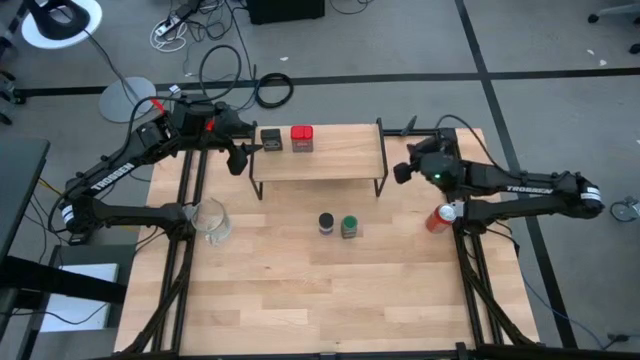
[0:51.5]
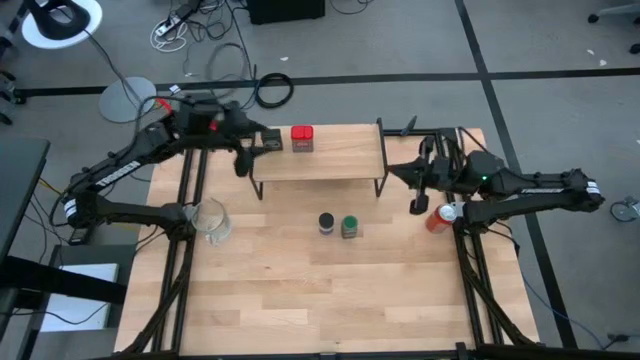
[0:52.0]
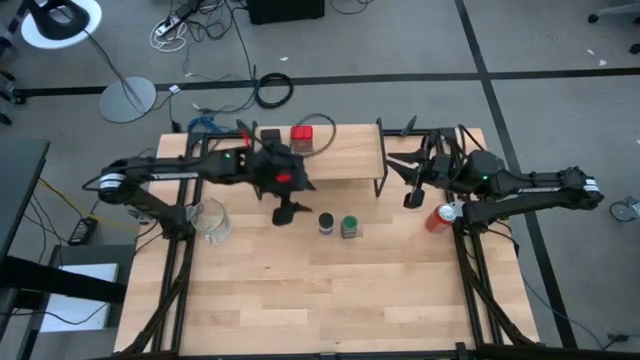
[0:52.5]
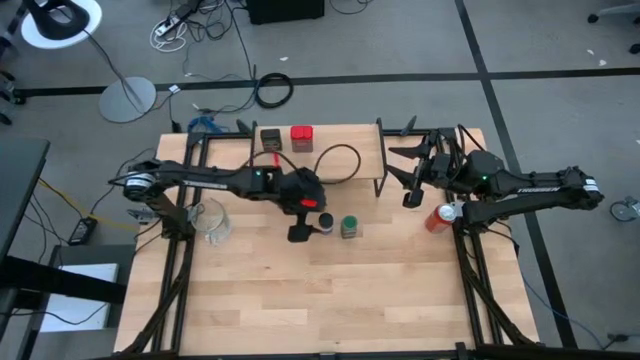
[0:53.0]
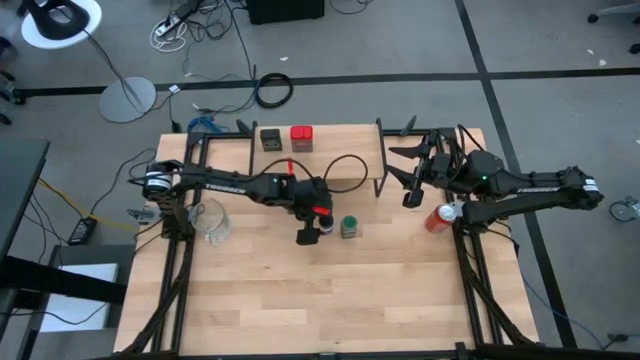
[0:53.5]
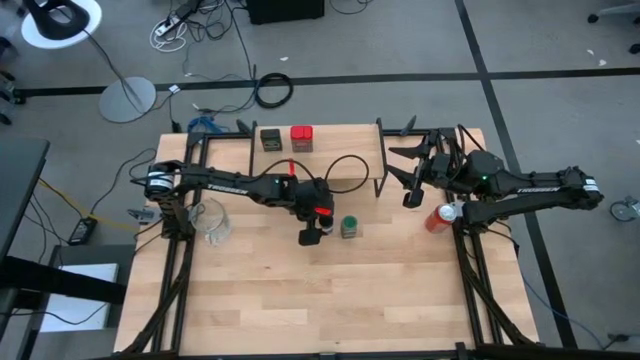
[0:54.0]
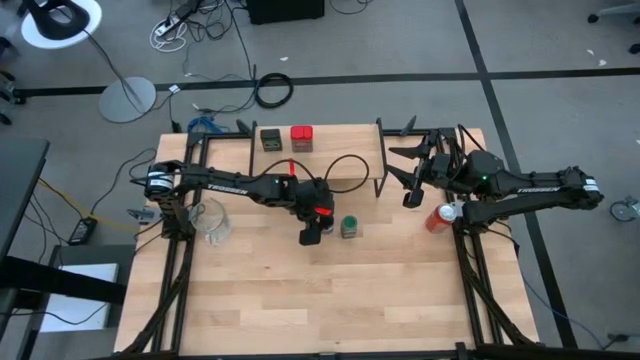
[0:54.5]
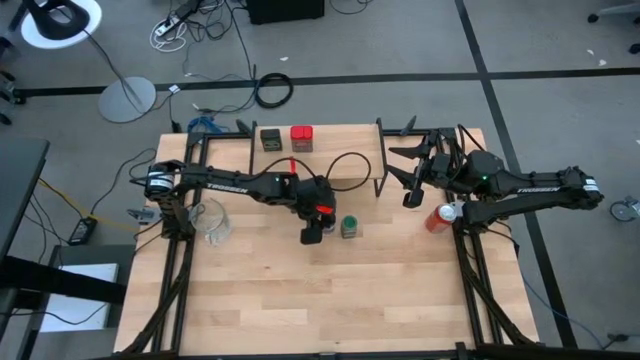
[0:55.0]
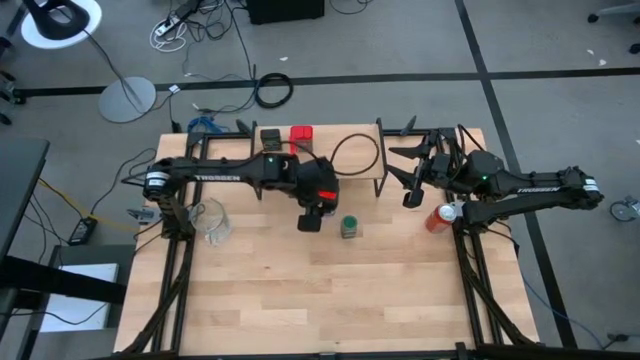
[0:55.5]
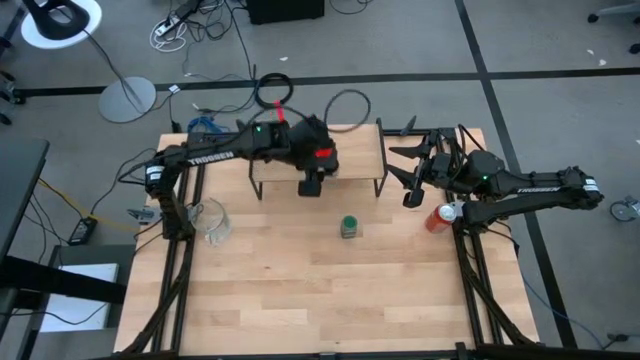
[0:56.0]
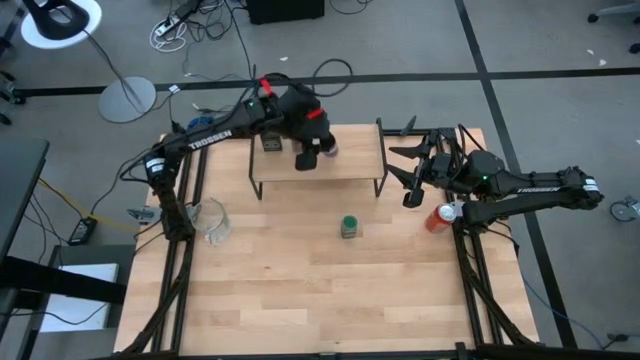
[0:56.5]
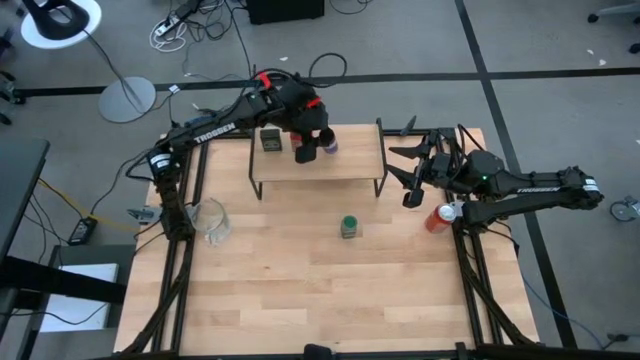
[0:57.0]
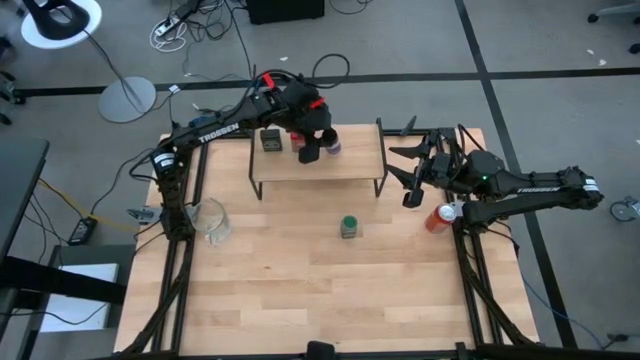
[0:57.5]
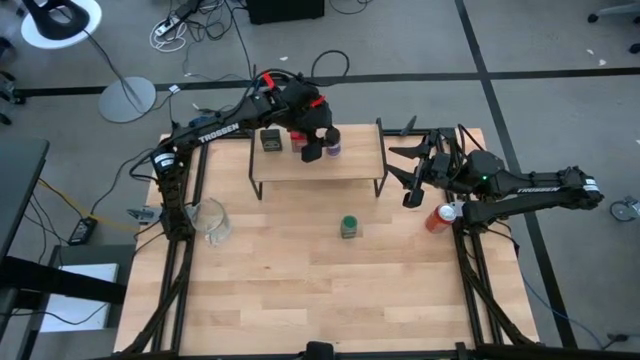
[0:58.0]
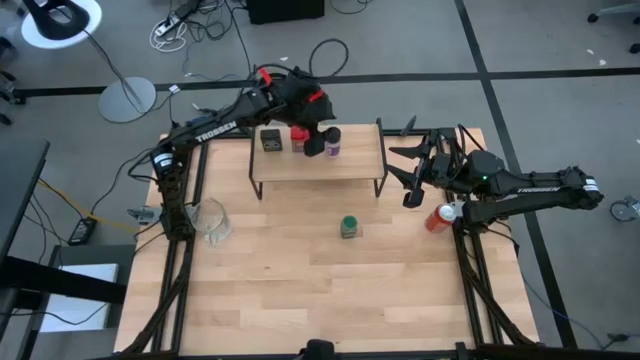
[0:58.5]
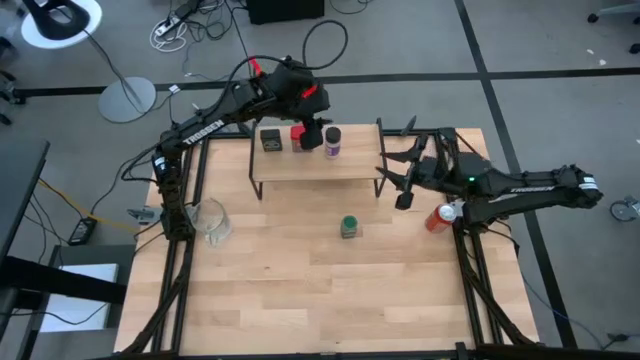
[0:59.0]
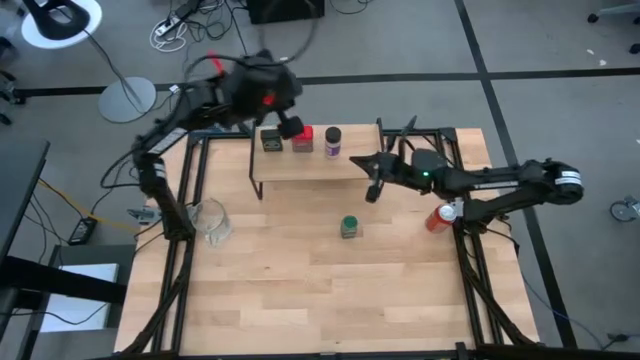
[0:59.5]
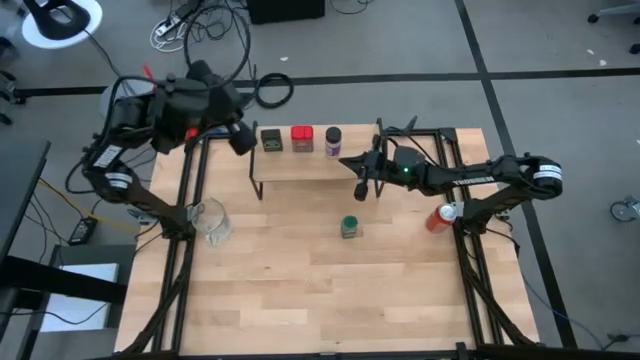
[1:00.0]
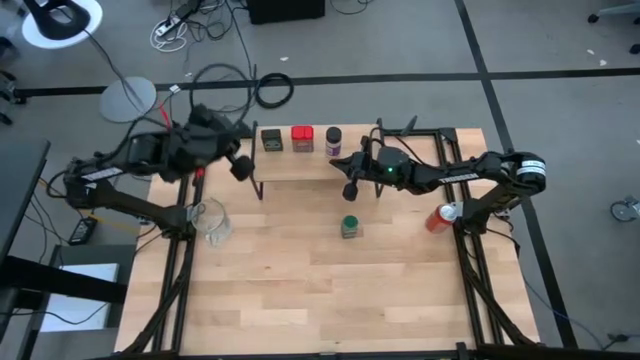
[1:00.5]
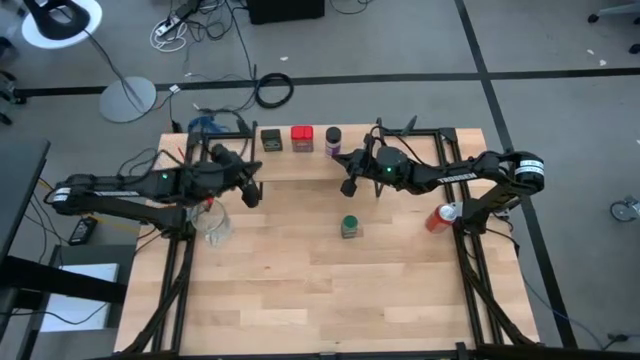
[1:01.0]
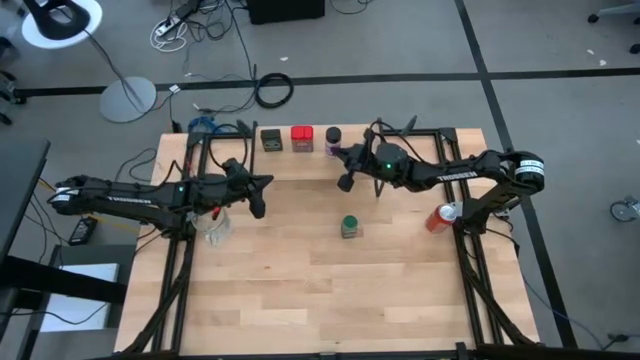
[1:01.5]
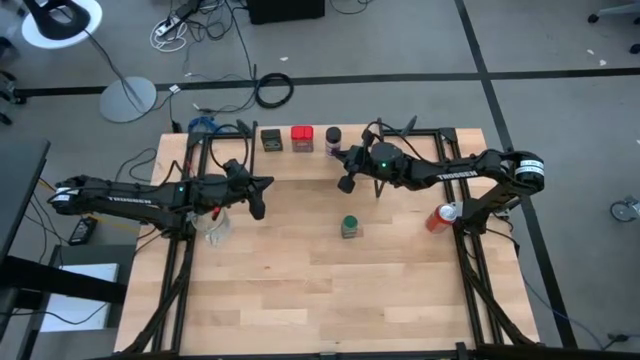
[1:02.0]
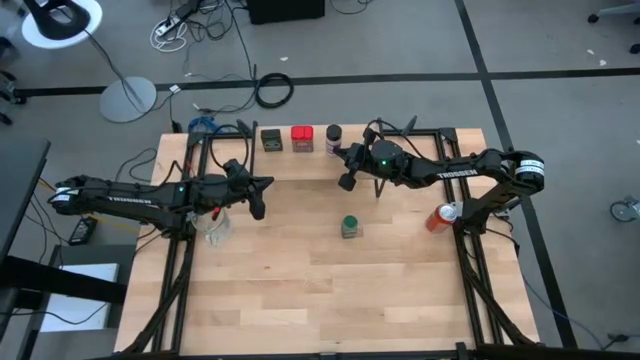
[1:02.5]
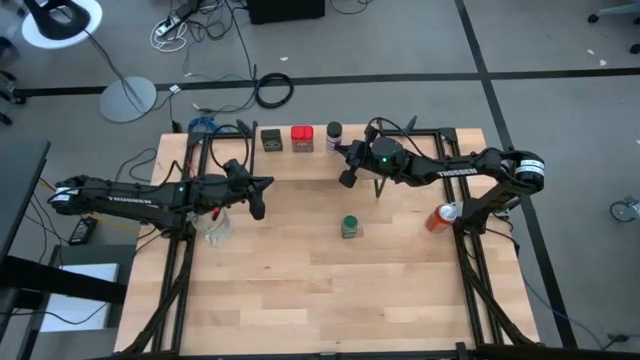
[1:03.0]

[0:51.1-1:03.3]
Task: Shelf spices
Put the black seasoning bottle on the shelf

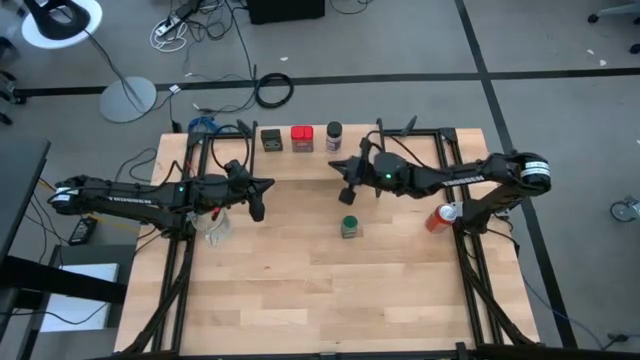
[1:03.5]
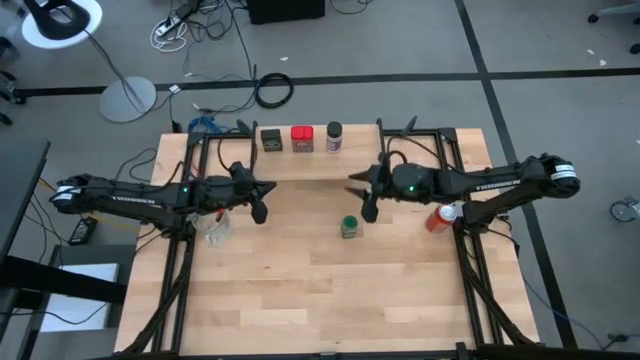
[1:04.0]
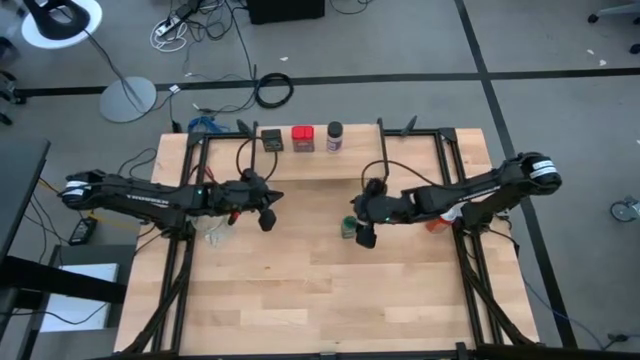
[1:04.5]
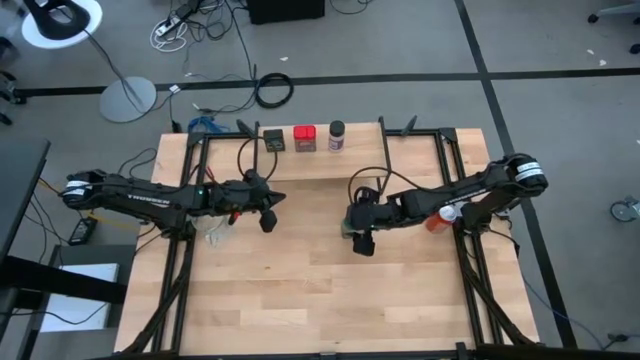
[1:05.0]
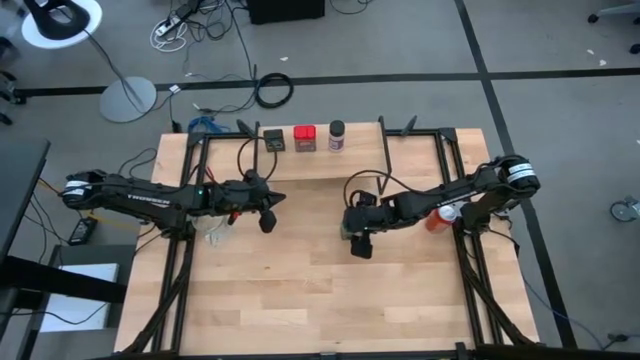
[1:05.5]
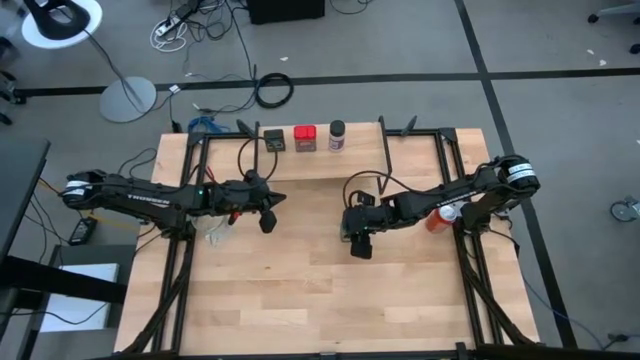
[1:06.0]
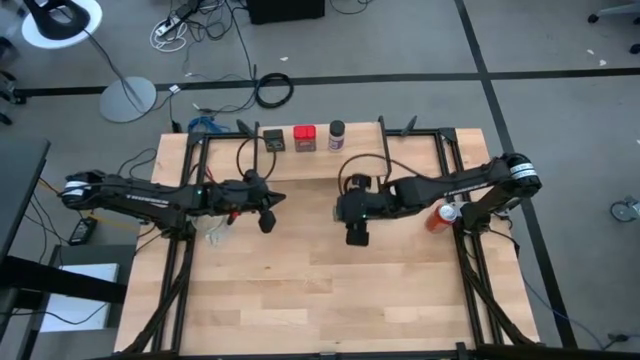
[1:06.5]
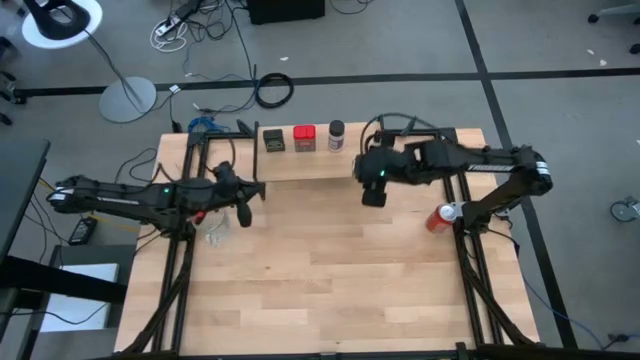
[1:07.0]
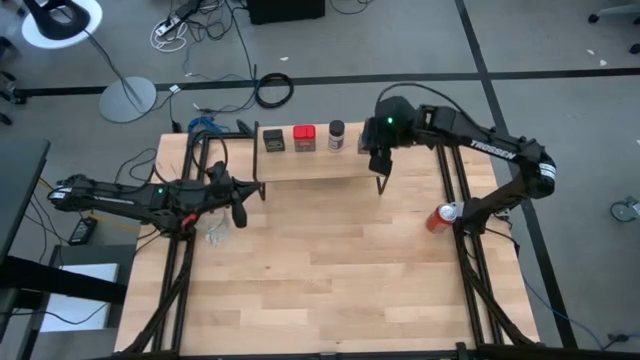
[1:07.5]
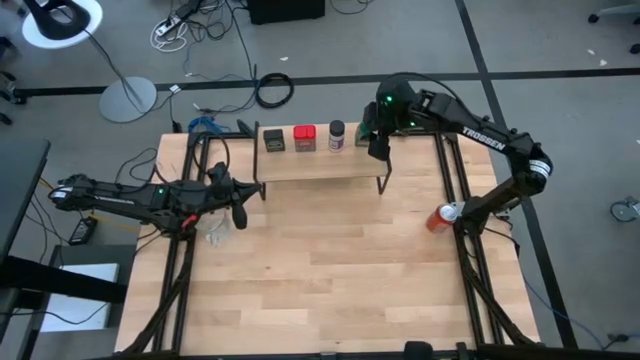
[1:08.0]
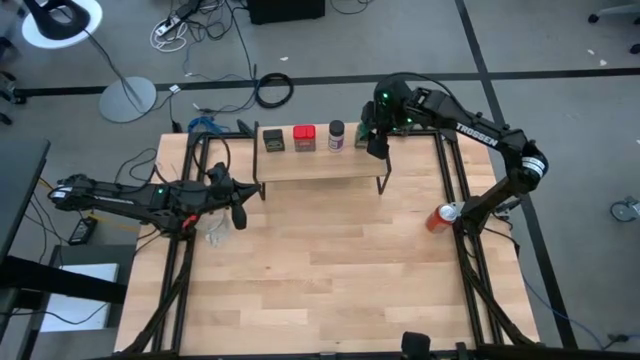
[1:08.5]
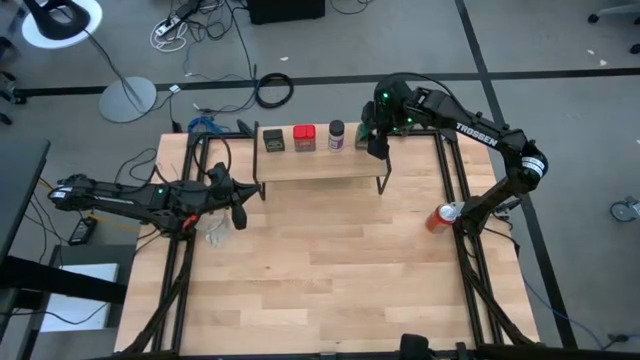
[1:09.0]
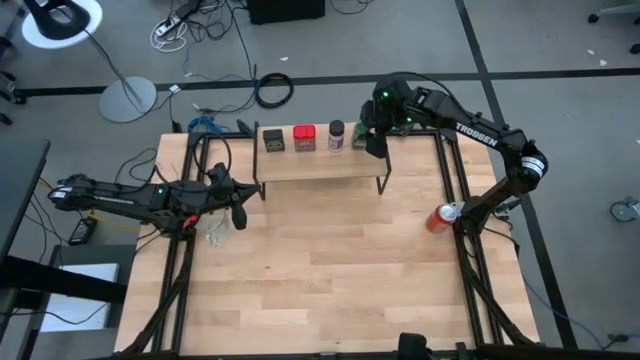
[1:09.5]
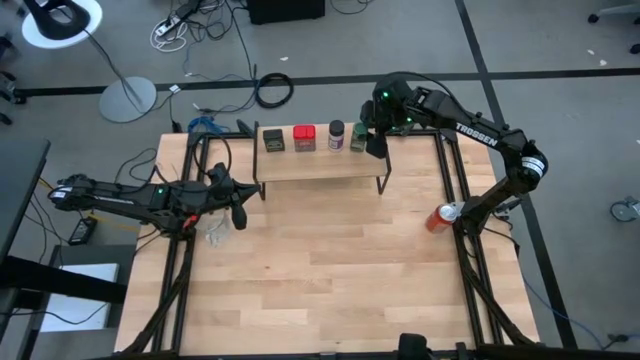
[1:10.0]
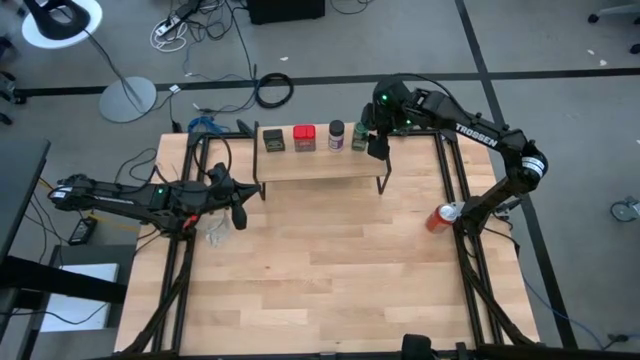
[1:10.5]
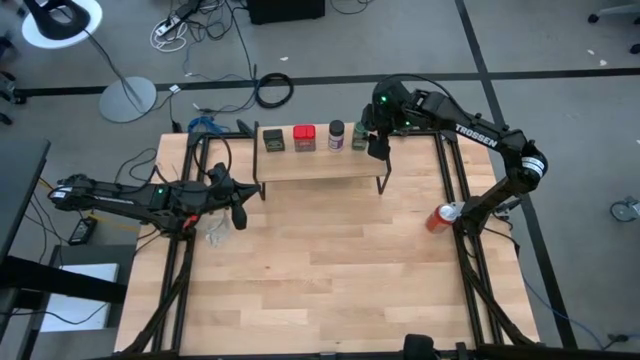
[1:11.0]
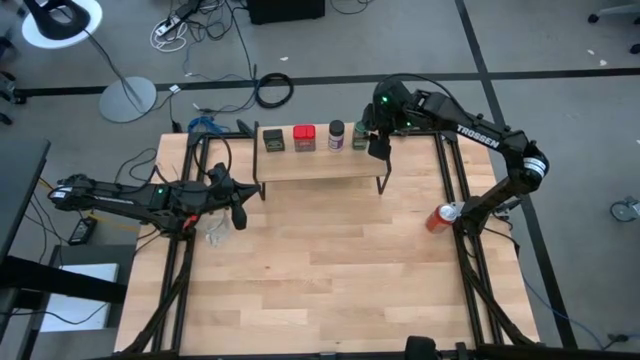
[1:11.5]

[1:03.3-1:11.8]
Put the green seasoning bottle on the shelf
